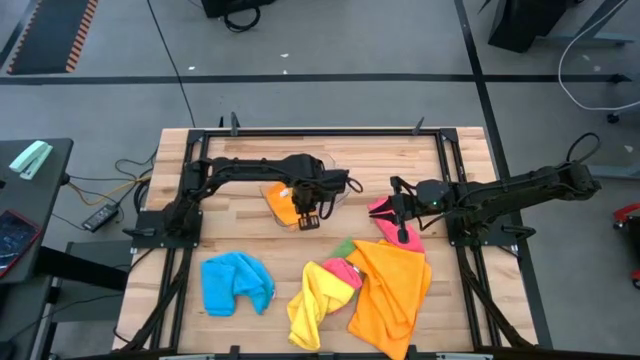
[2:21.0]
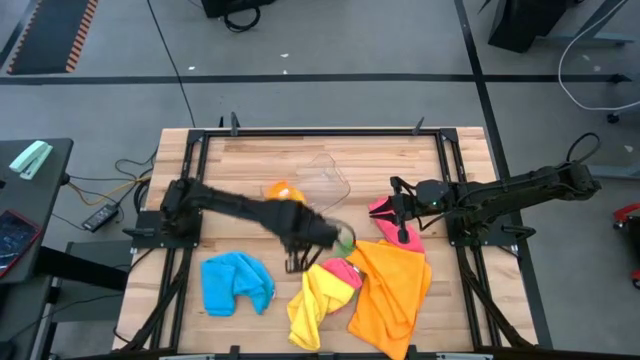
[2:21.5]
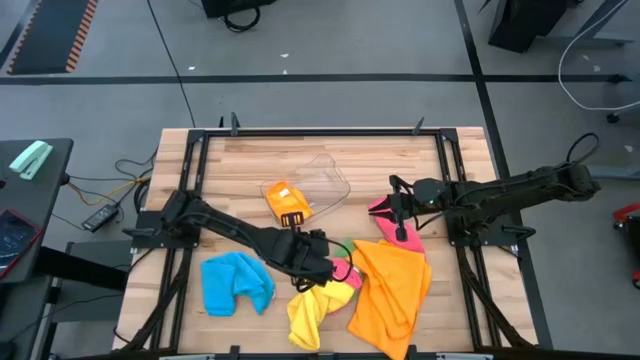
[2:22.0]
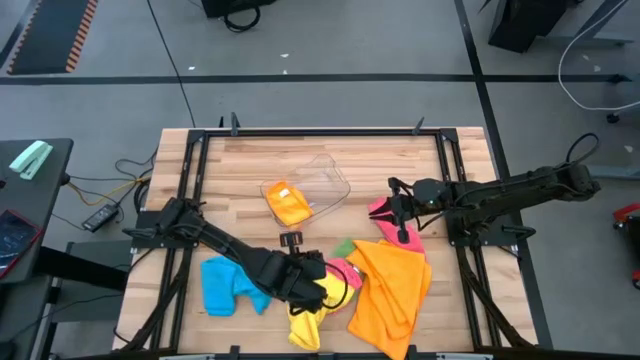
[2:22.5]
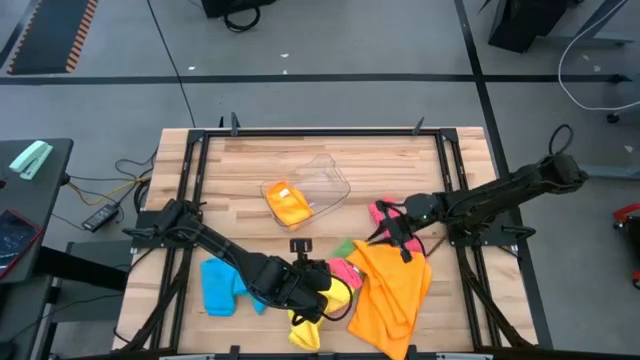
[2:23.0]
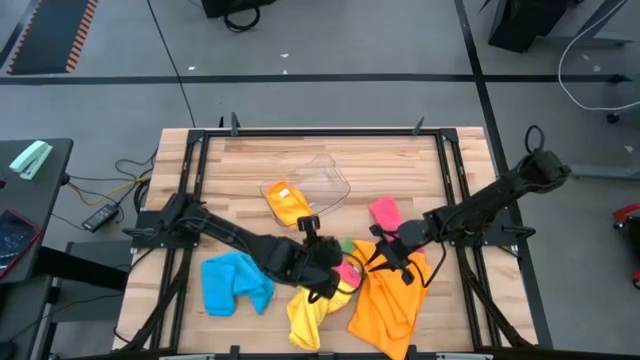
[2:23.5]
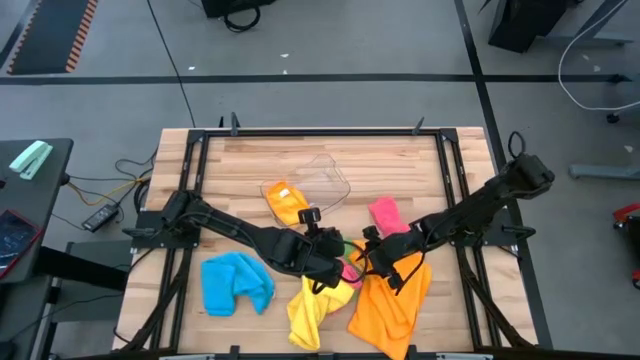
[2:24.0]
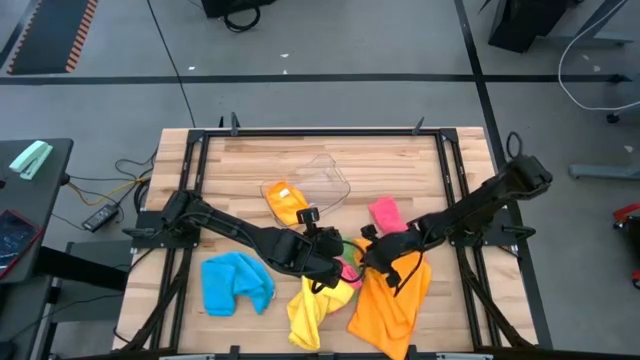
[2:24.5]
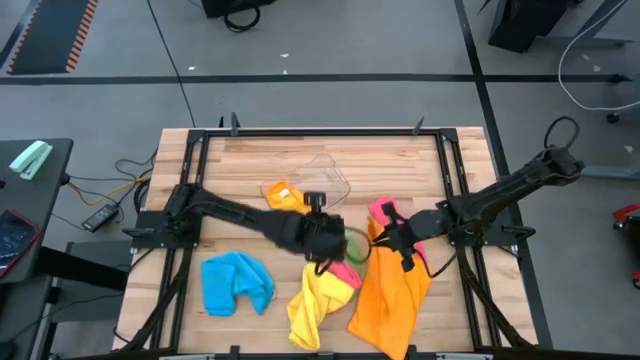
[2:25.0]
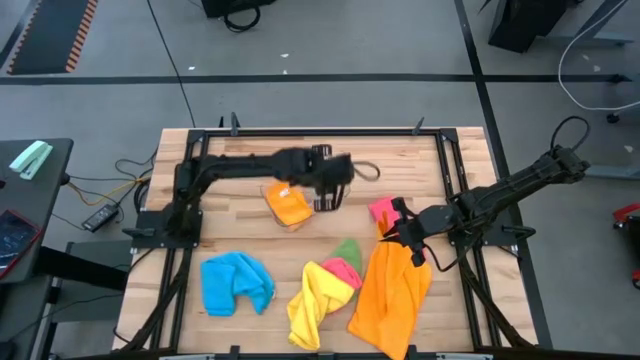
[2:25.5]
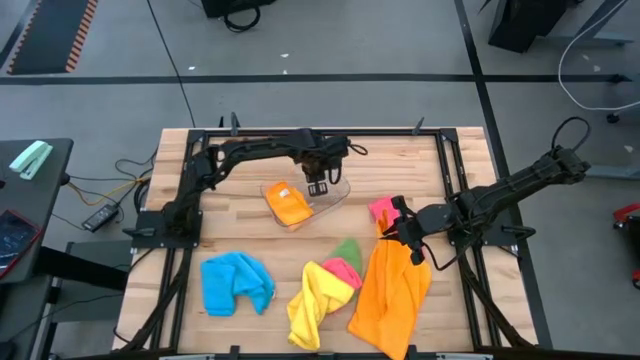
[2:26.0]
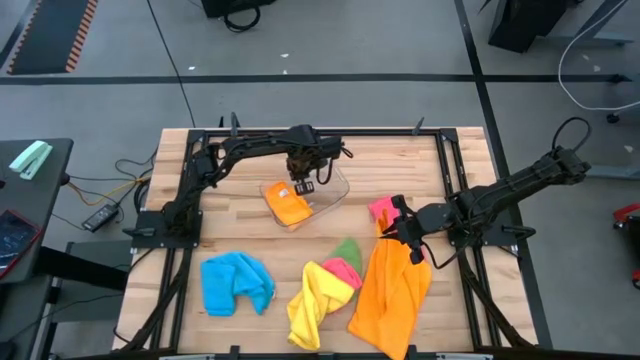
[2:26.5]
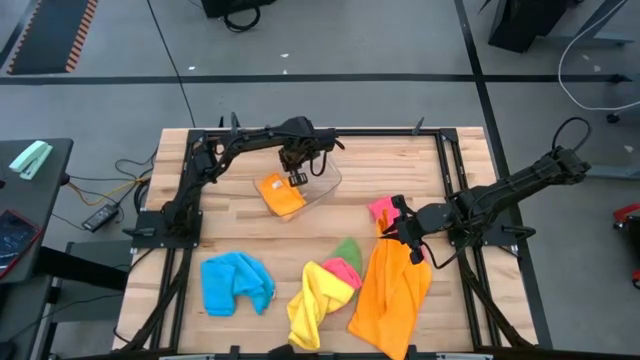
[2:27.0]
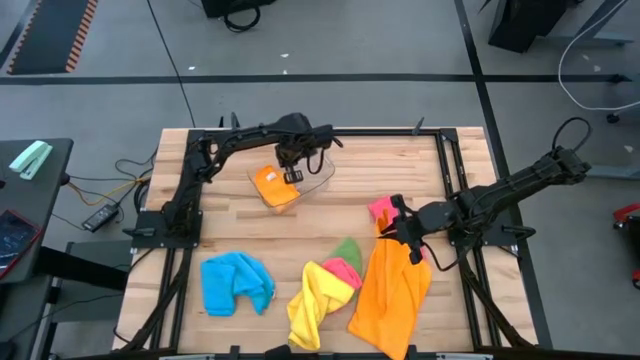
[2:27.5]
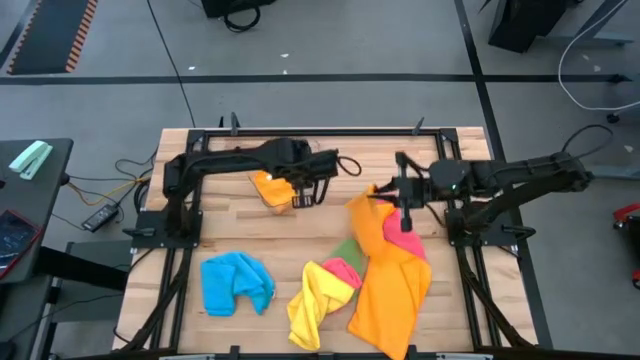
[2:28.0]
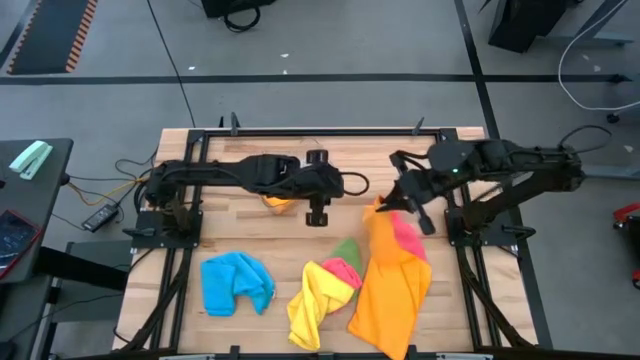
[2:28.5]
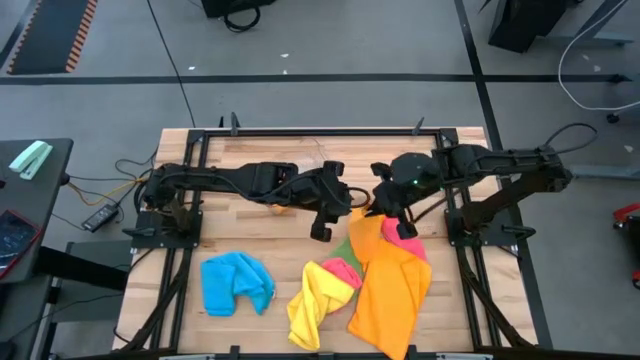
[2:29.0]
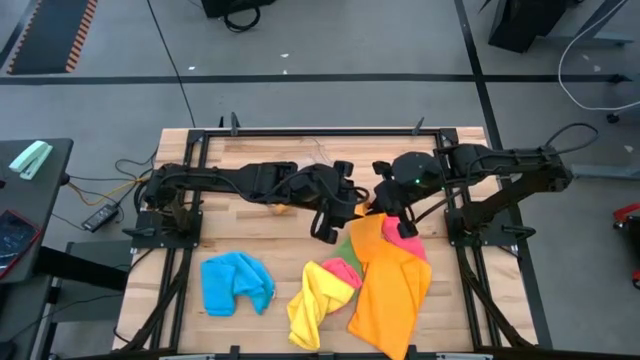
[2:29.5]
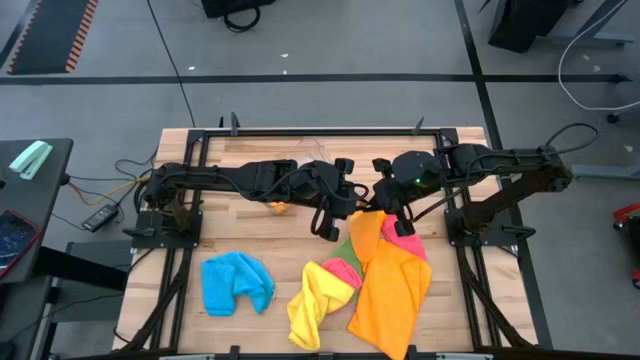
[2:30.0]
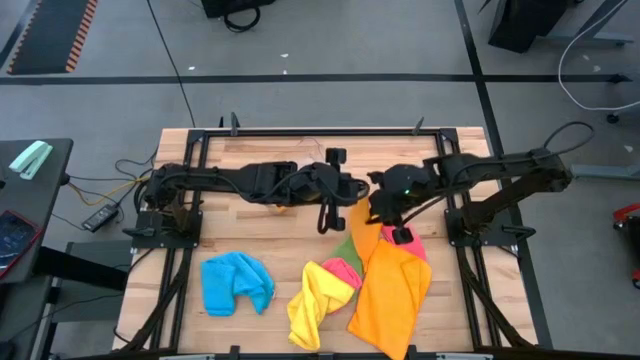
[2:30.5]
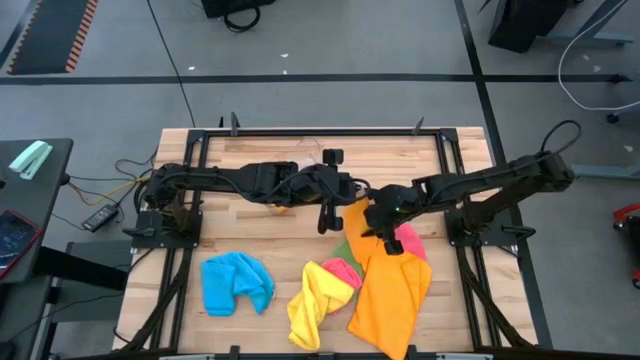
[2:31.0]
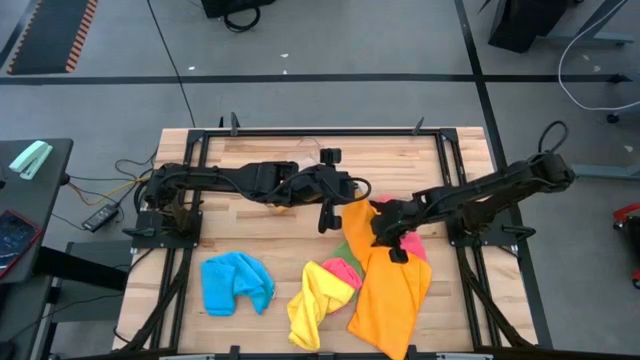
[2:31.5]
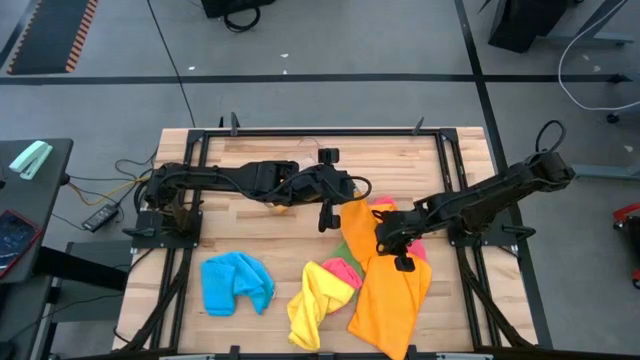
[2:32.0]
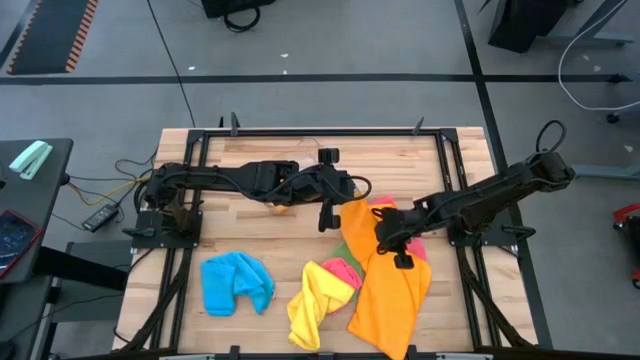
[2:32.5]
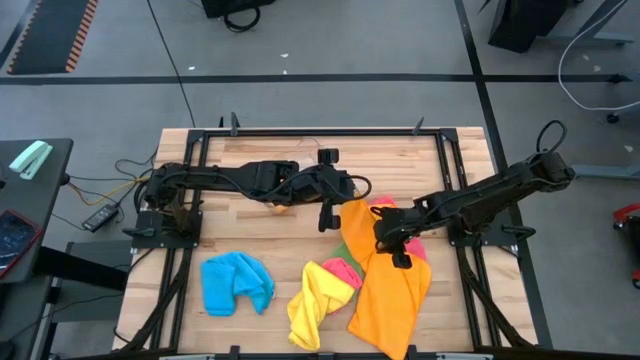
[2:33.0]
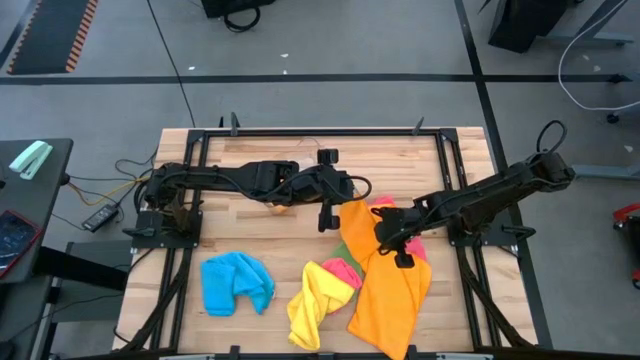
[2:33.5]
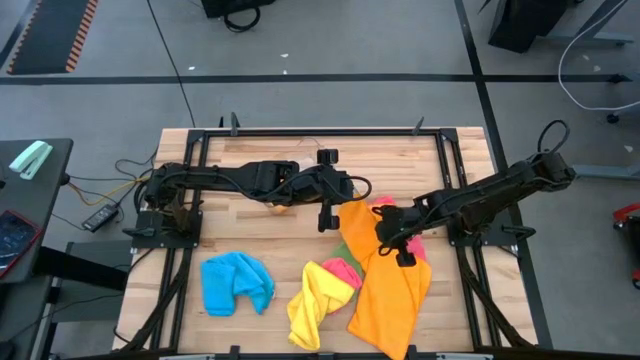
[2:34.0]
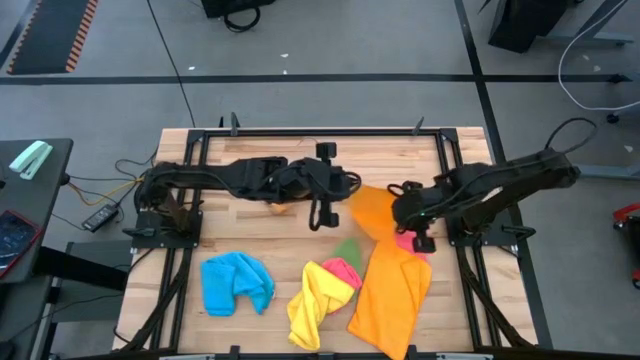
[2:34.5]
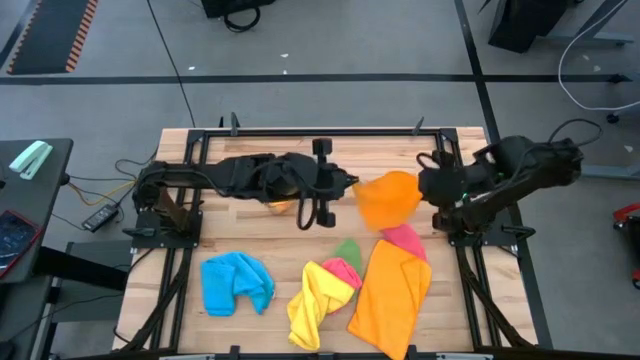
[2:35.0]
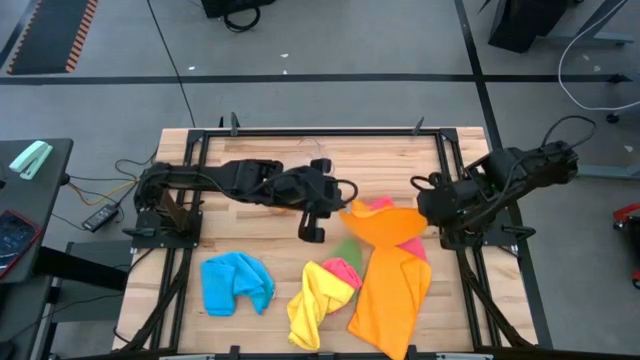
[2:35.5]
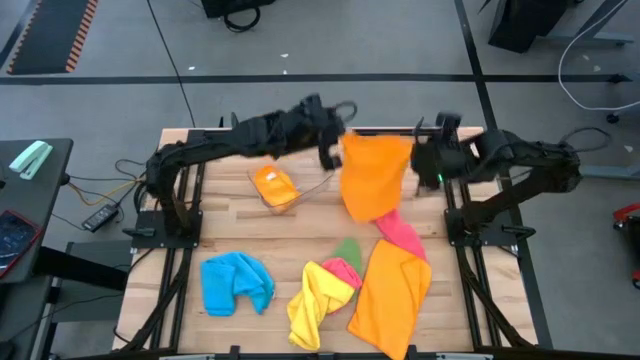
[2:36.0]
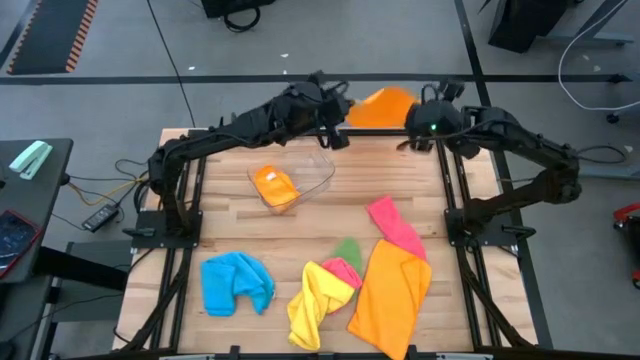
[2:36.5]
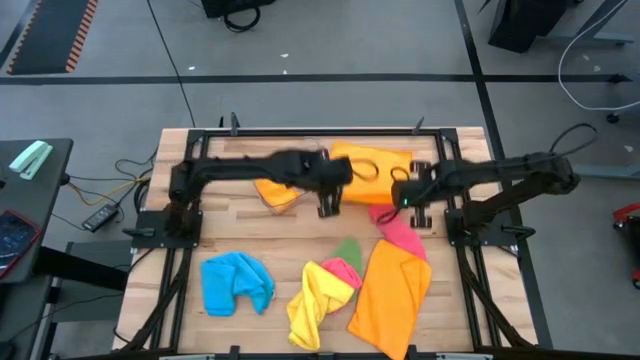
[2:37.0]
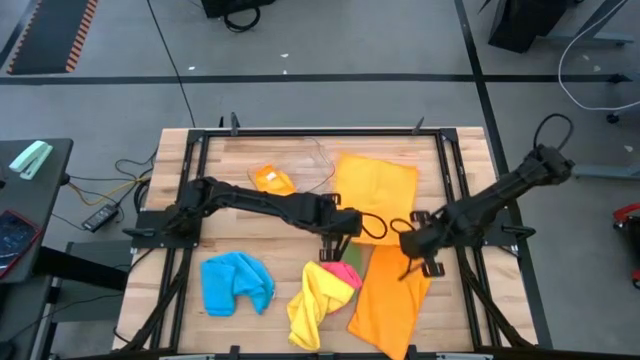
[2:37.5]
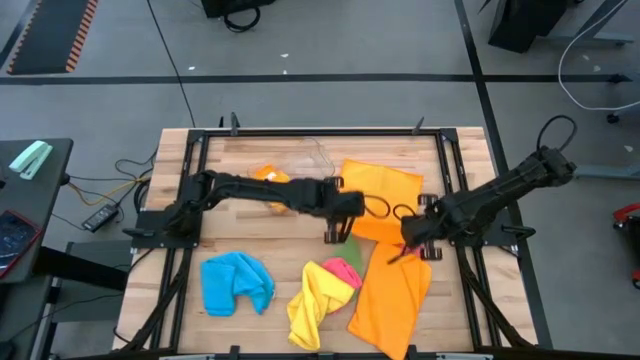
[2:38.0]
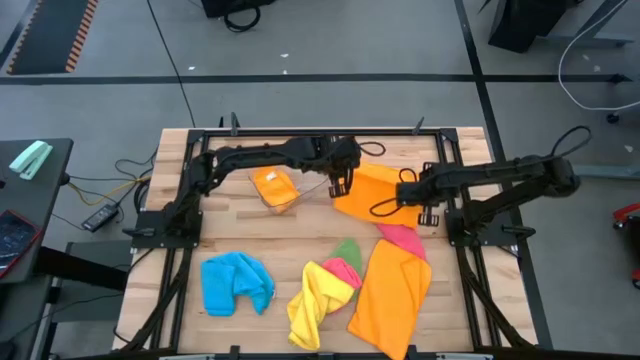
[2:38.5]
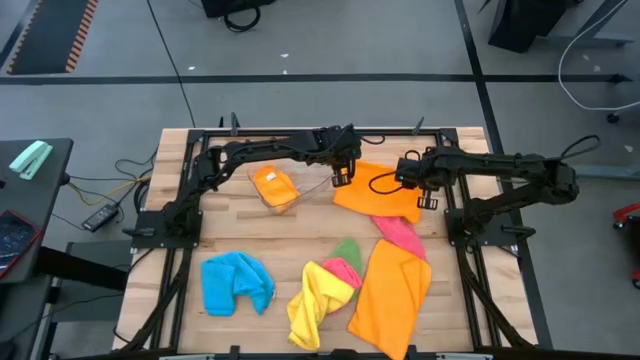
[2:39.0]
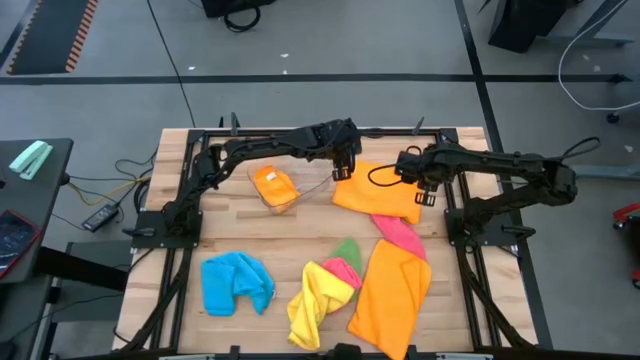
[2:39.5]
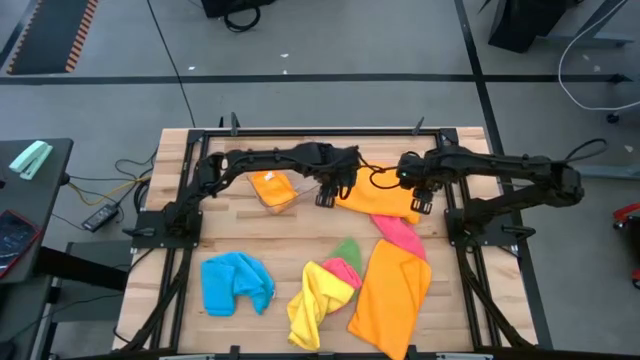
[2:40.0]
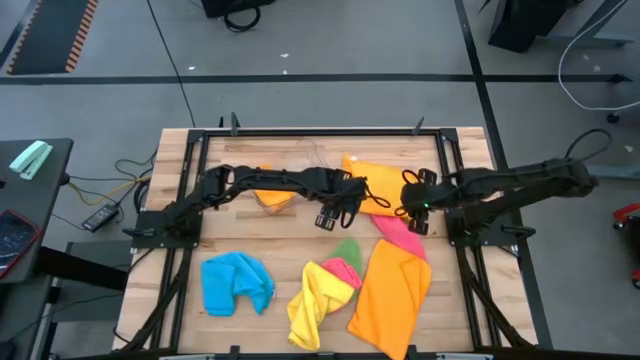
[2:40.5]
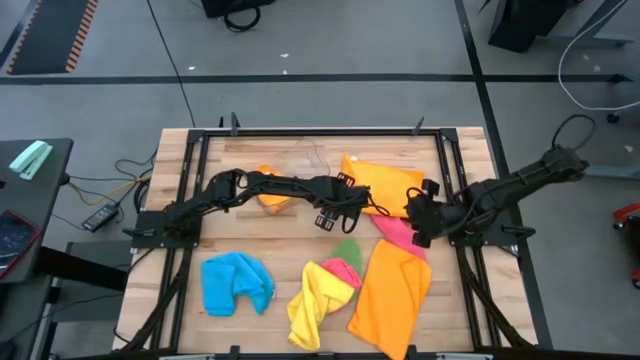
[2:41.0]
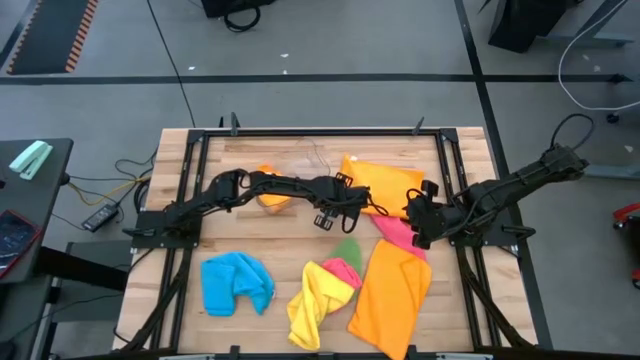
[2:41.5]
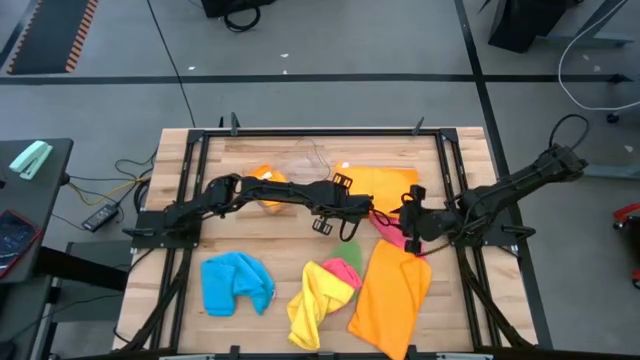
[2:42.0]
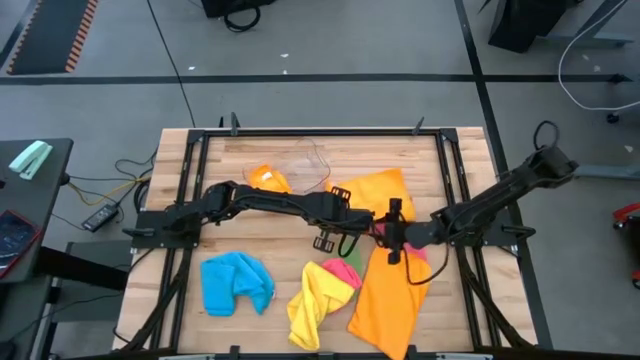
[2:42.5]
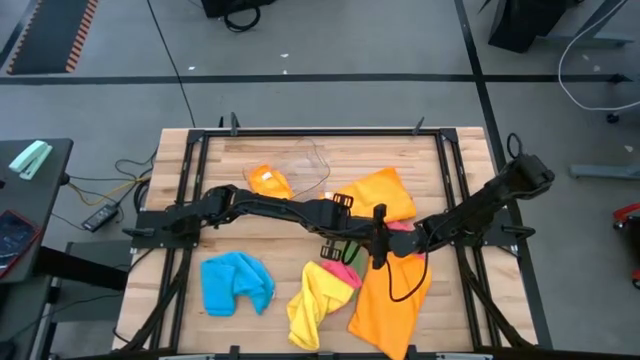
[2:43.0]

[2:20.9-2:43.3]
Task: Fold microfiber towels
Fold the orange microfiber towel
